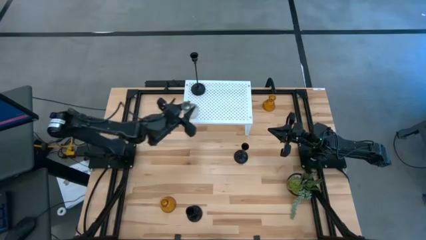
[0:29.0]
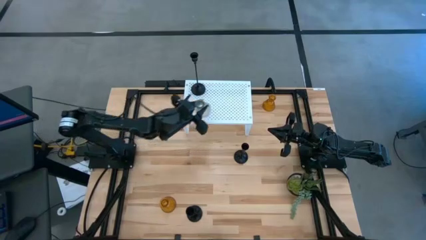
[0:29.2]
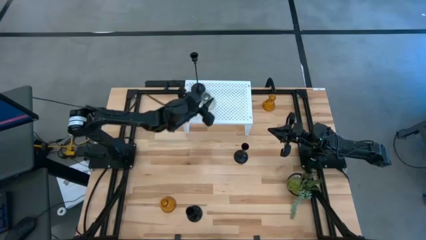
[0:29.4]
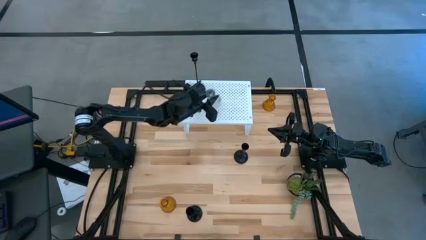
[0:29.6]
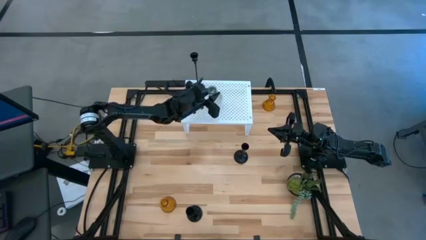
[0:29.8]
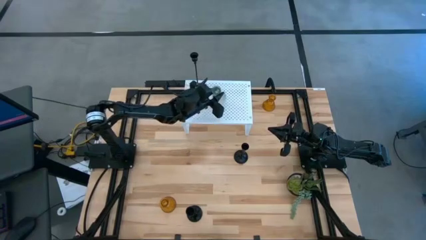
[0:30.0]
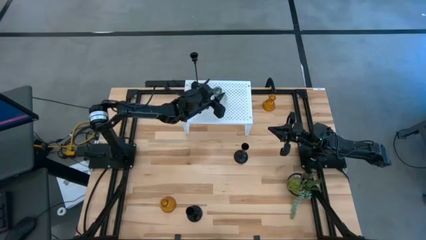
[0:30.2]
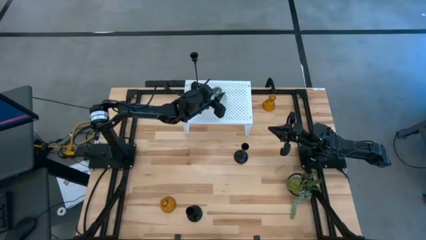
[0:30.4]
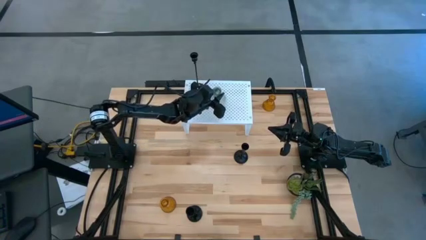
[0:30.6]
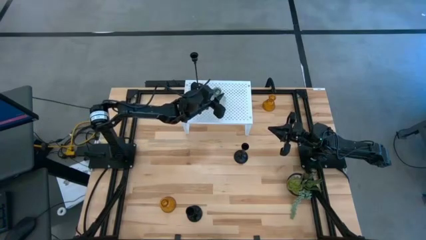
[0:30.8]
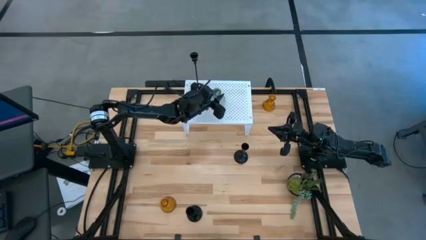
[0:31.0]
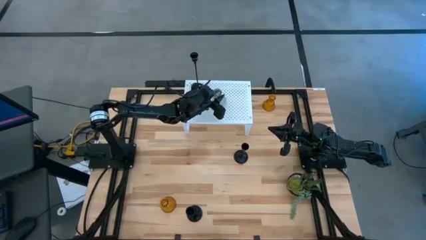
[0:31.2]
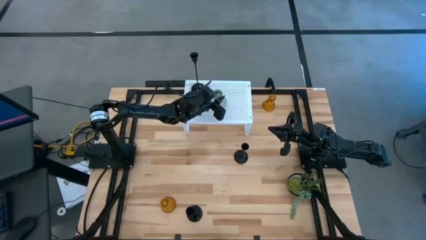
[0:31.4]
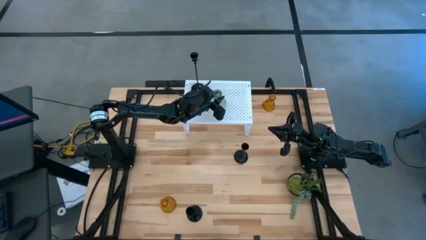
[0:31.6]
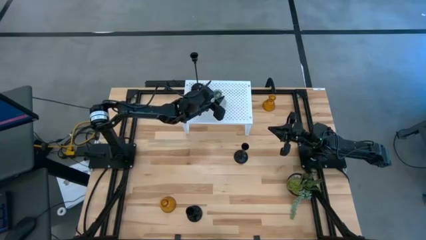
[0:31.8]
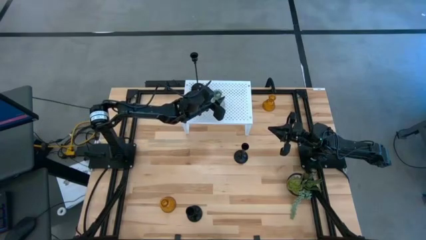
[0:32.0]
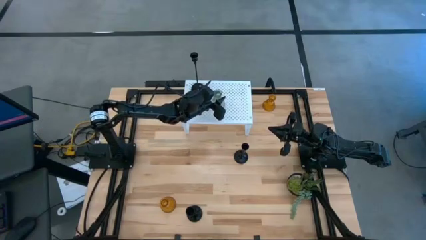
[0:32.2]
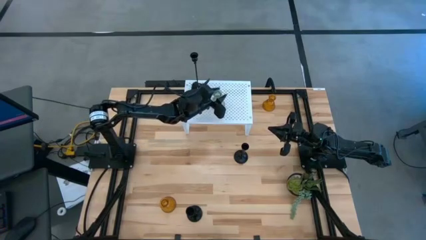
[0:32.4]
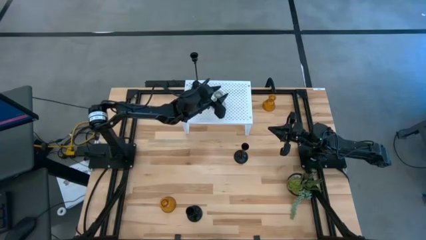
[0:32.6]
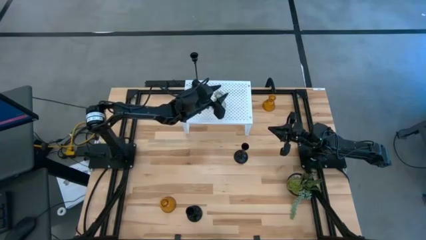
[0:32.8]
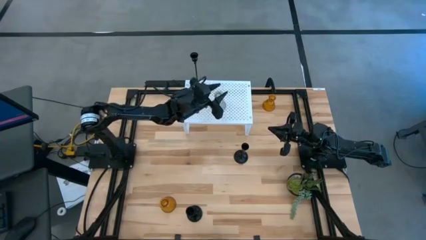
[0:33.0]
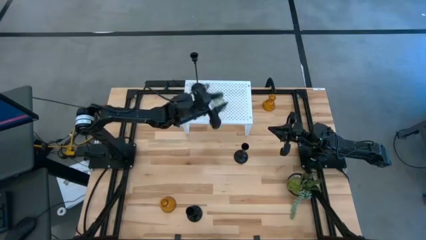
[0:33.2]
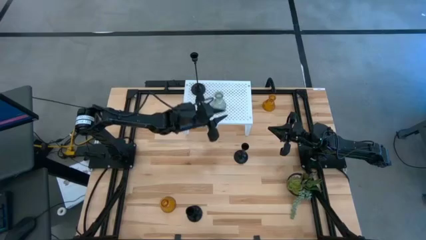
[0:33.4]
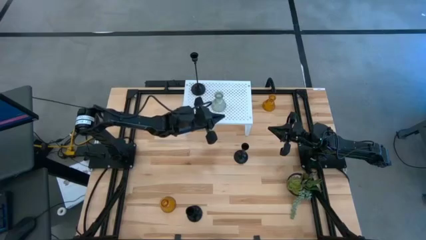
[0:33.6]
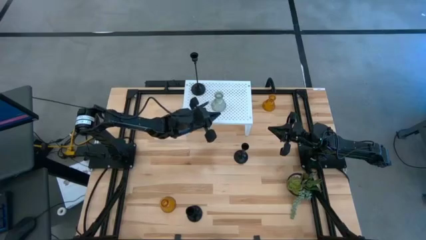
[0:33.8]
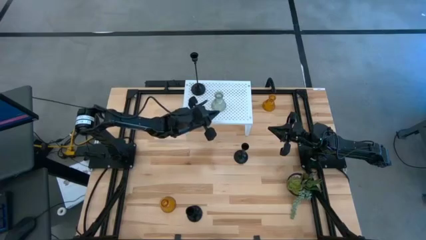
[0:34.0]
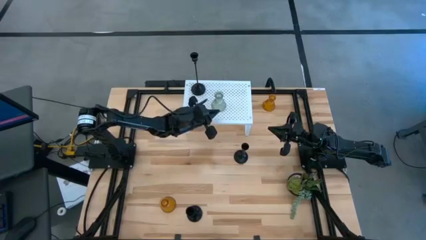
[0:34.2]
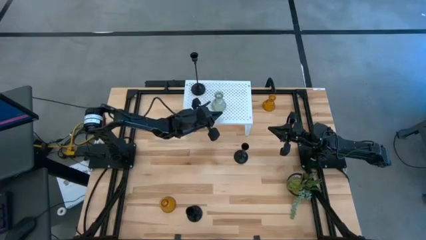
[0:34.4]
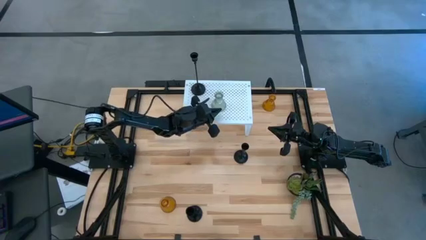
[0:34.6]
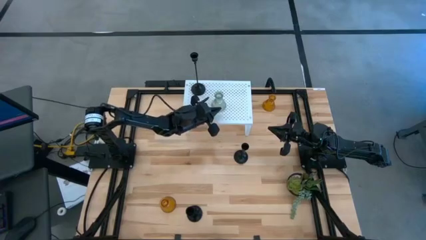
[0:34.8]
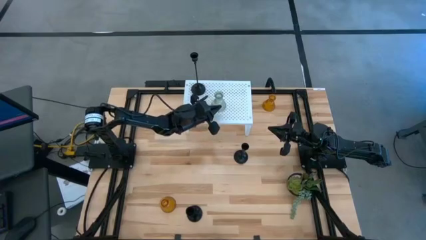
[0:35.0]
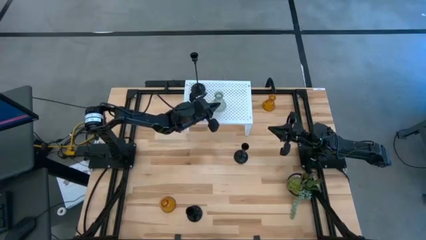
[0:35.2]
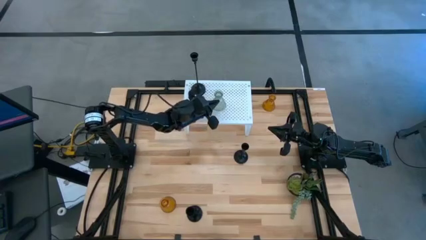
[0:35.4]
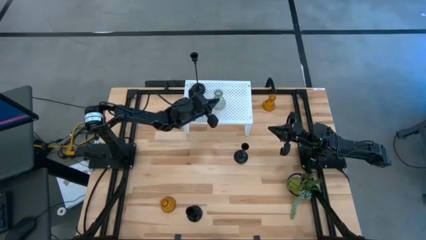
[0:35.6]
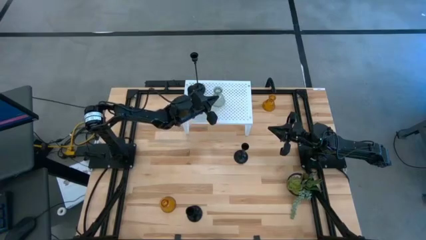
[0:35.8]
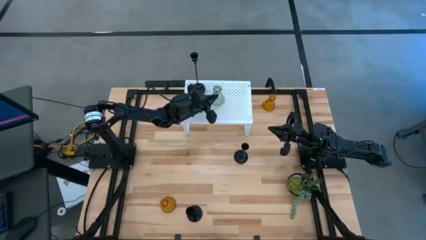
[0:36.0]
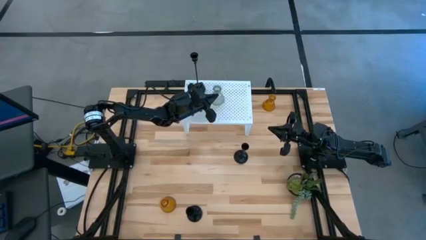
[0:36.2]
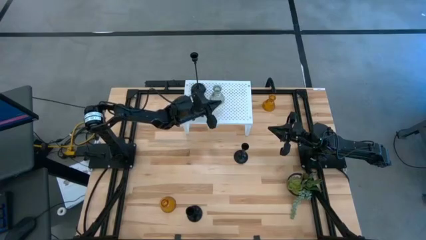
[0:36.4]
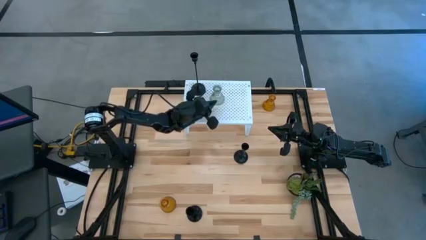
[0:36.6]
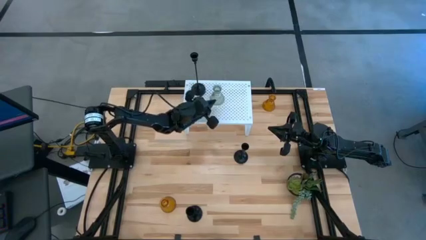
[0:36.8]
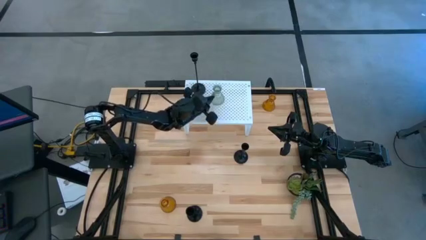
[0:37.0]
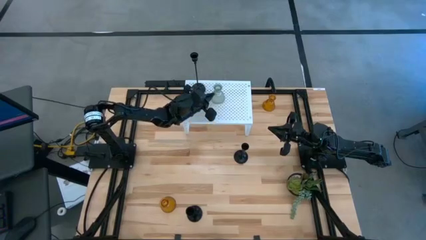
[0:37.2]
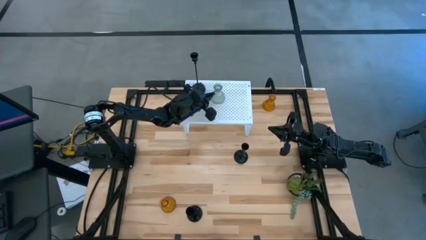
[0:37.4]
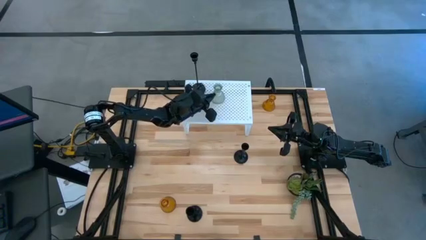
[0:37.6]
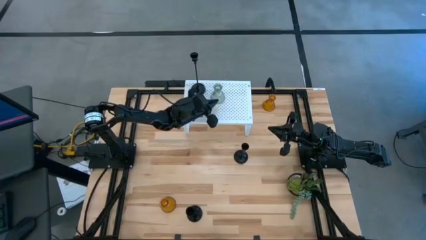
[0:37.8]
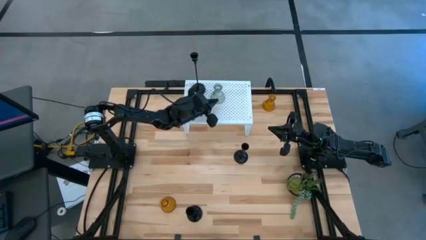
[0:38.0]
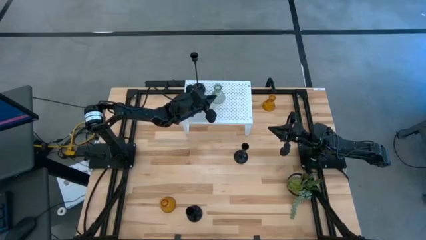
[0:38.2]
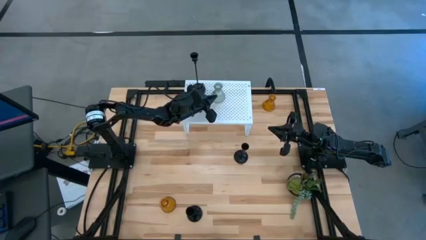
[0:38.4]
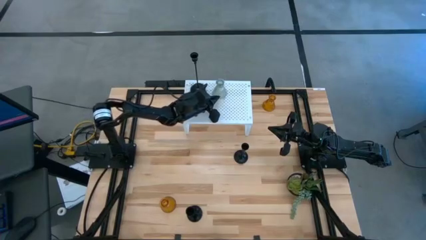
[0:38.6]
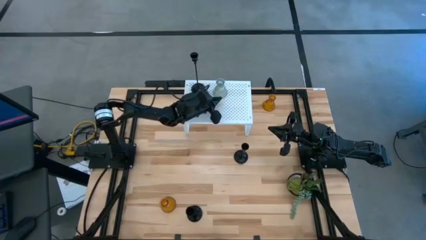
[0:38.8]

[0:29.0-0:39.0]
Task: Pick & Place candle stick holders
Put the transparent glass candle holder on the shelf
